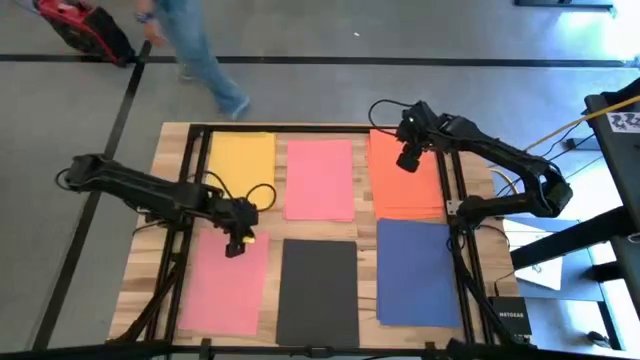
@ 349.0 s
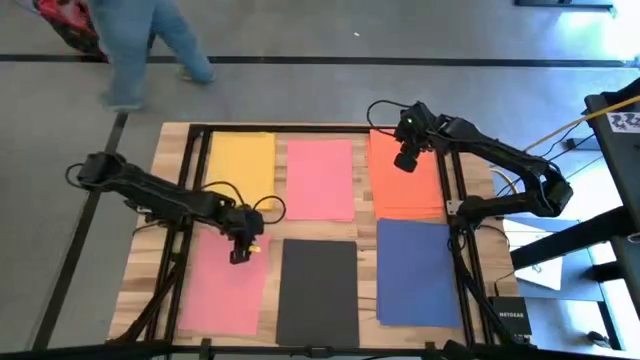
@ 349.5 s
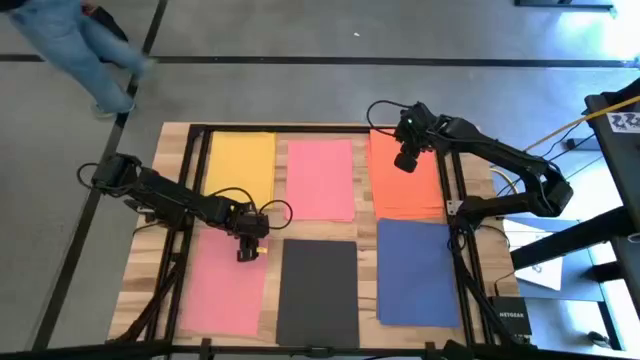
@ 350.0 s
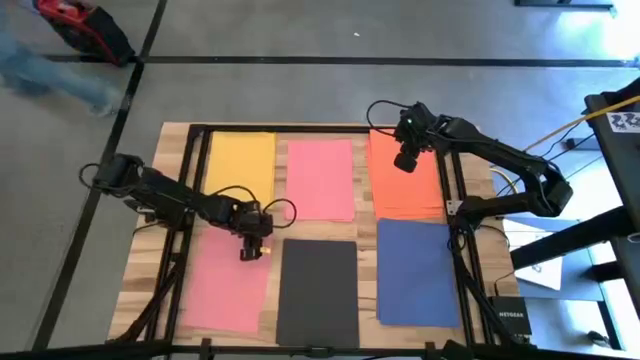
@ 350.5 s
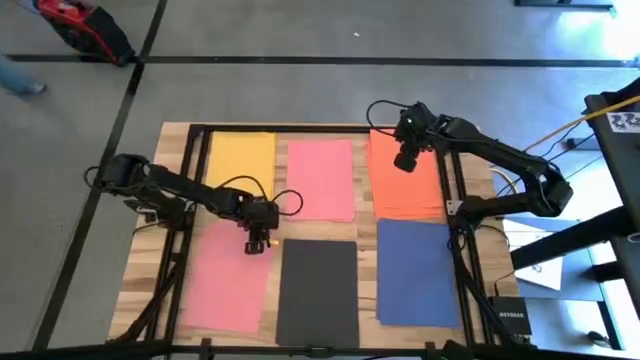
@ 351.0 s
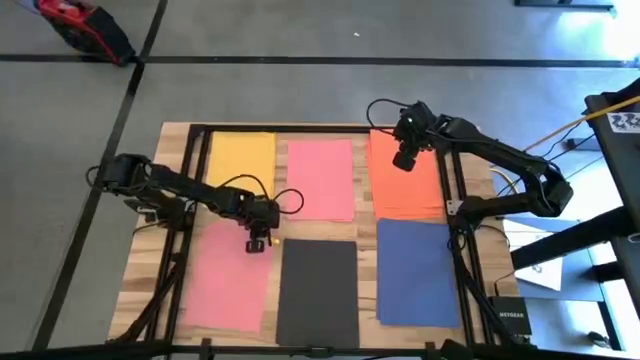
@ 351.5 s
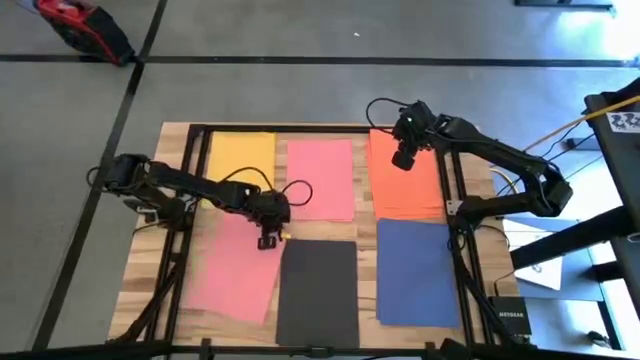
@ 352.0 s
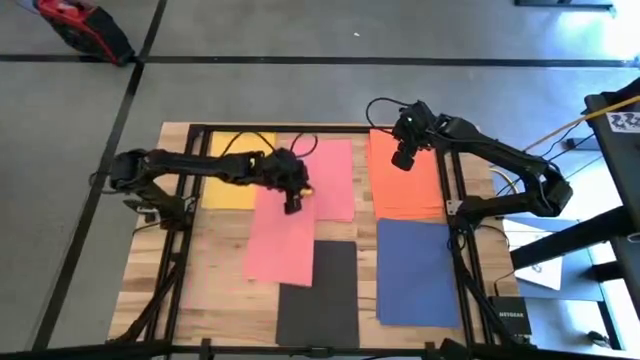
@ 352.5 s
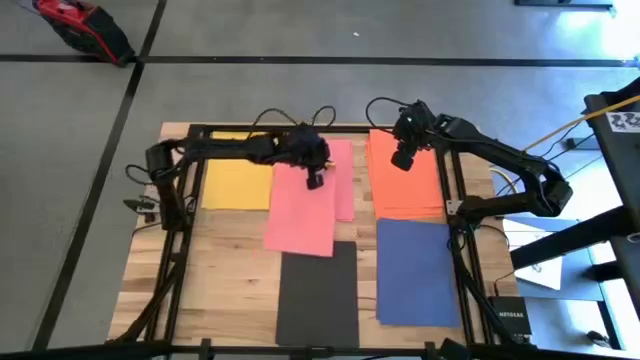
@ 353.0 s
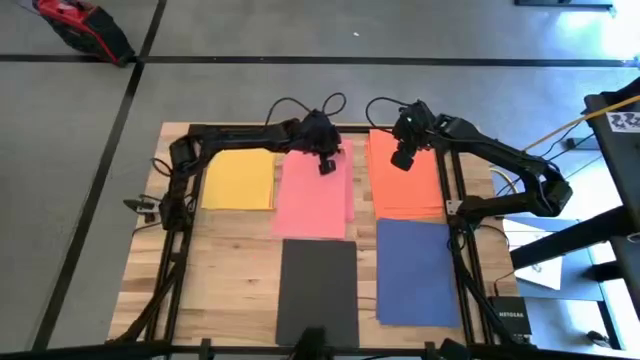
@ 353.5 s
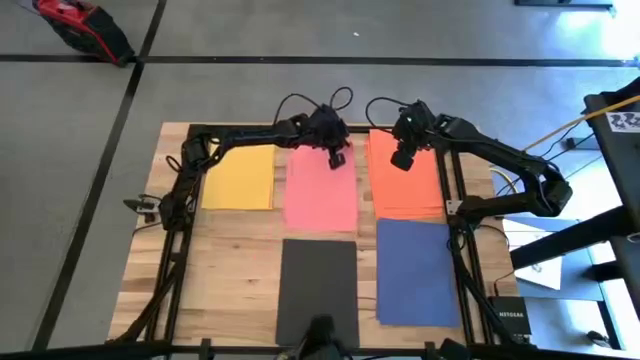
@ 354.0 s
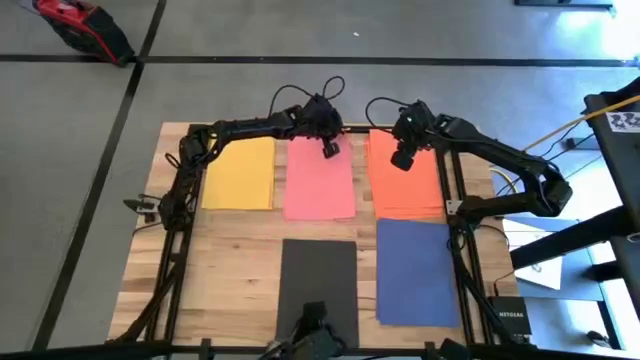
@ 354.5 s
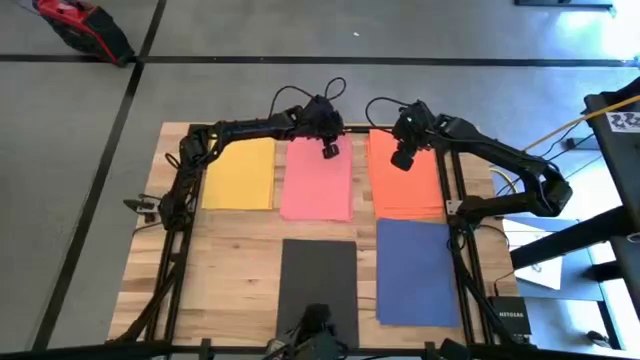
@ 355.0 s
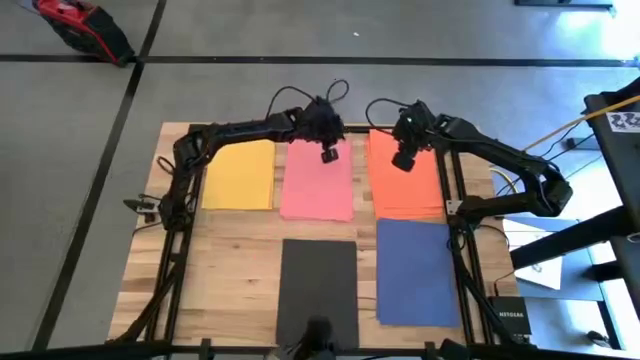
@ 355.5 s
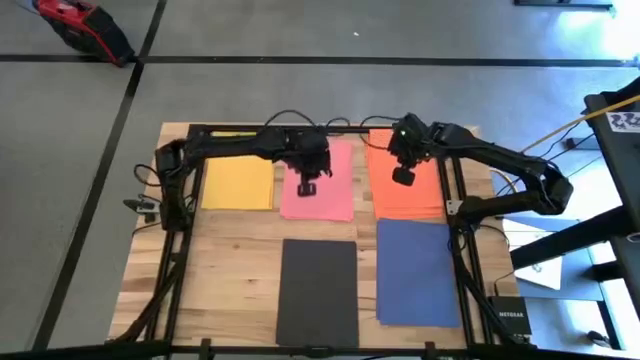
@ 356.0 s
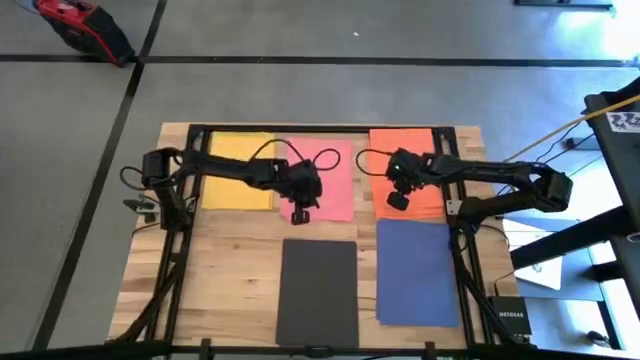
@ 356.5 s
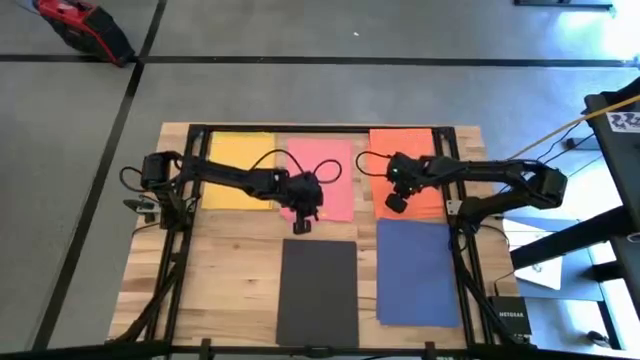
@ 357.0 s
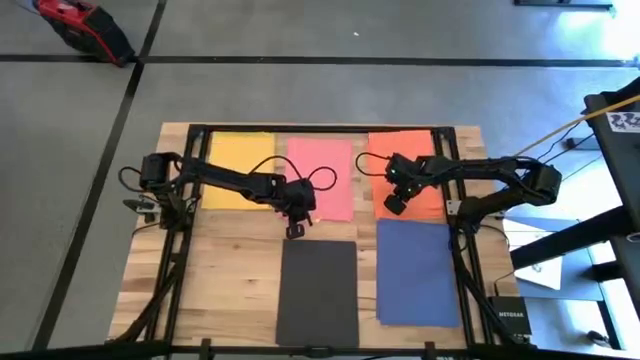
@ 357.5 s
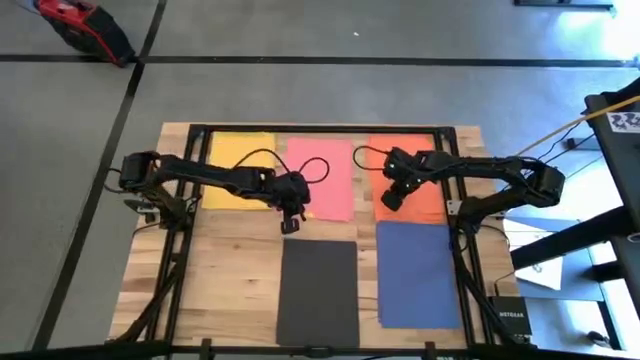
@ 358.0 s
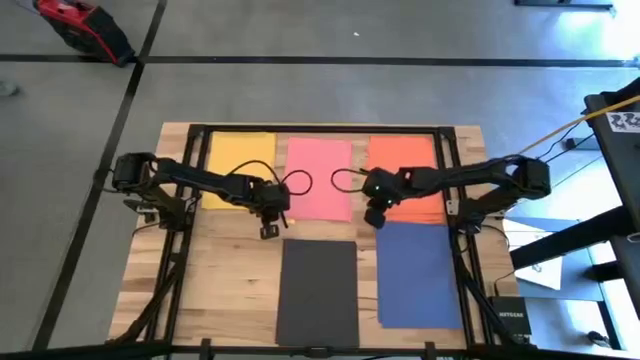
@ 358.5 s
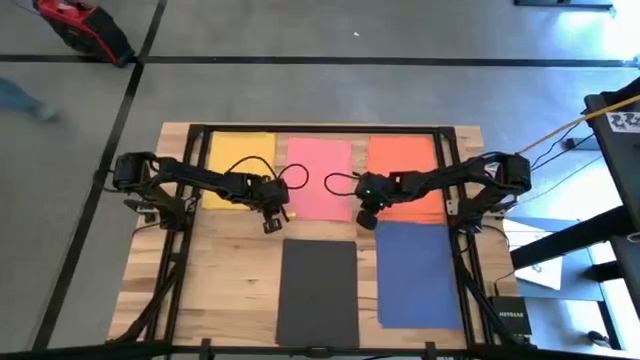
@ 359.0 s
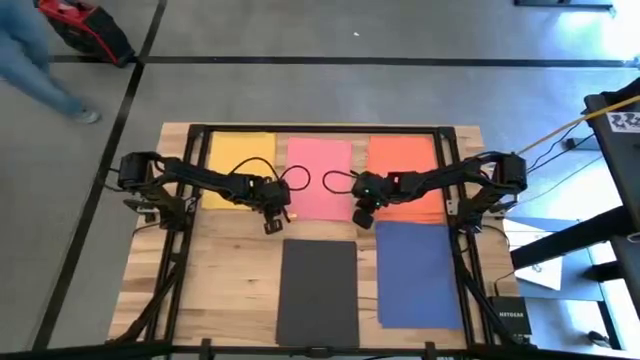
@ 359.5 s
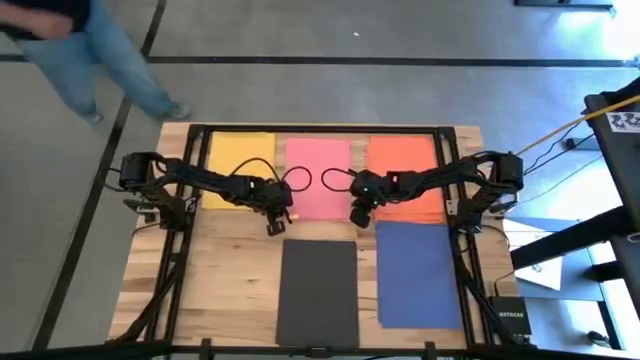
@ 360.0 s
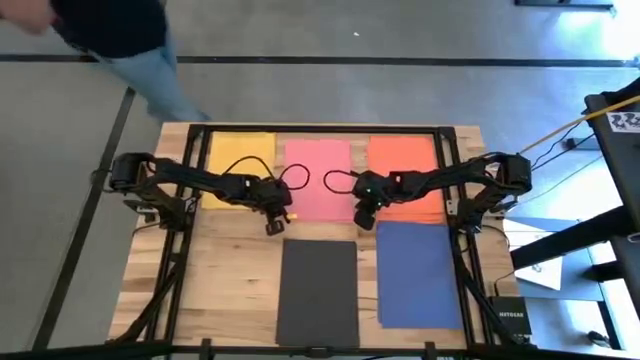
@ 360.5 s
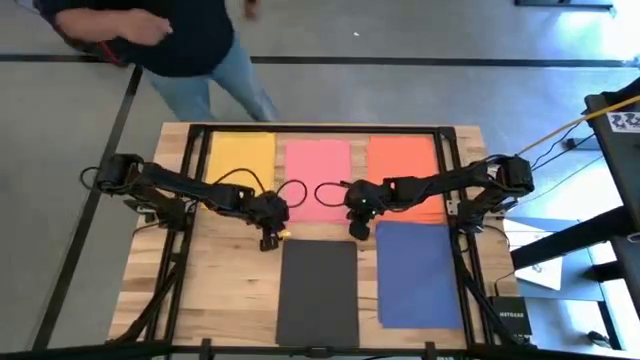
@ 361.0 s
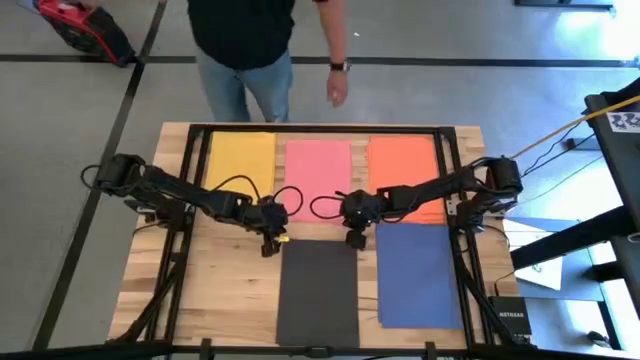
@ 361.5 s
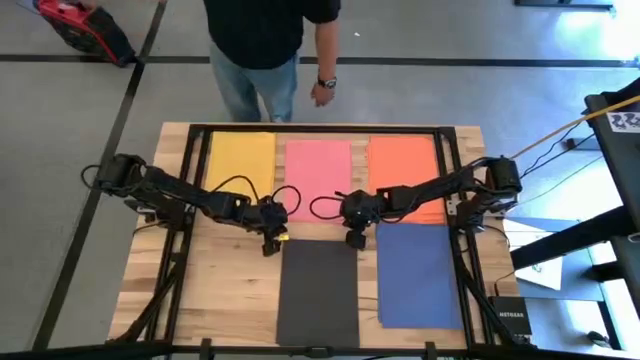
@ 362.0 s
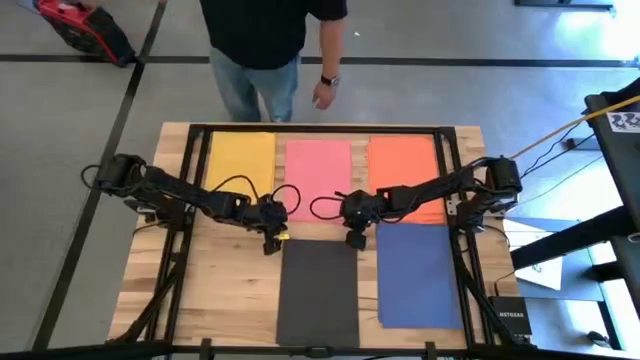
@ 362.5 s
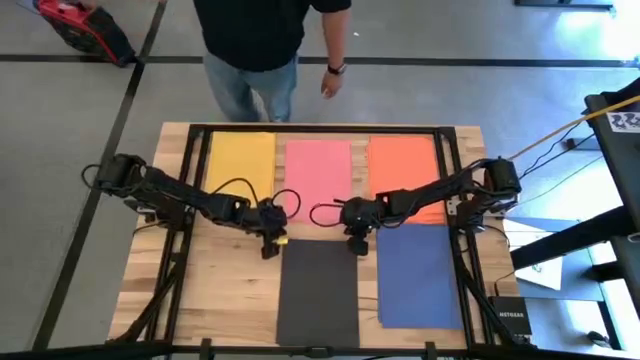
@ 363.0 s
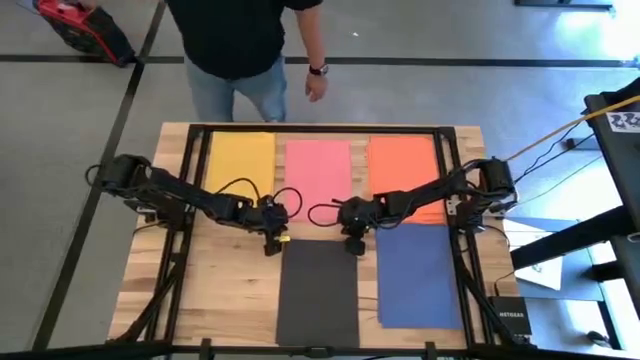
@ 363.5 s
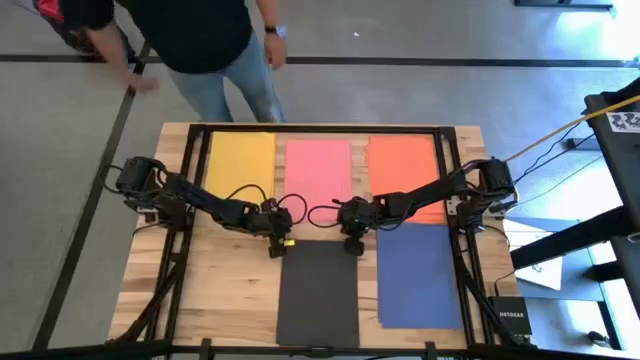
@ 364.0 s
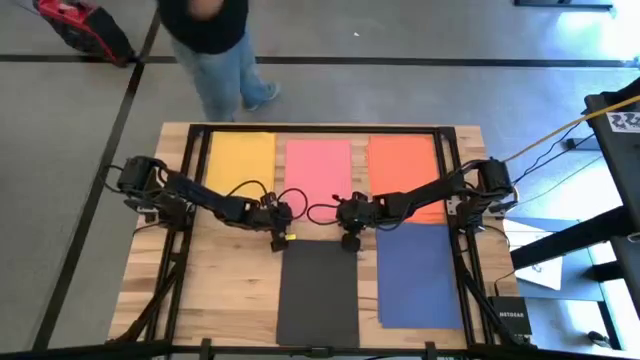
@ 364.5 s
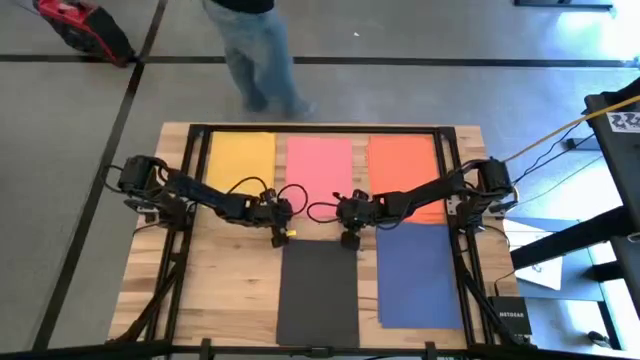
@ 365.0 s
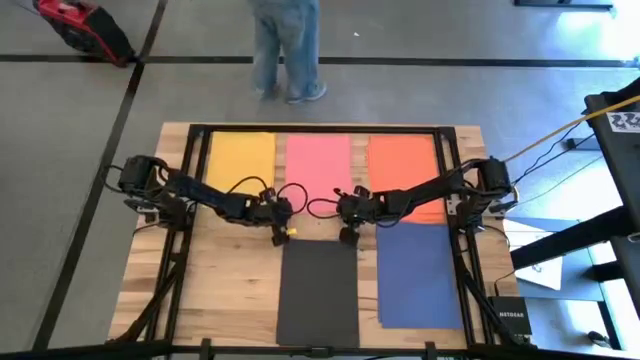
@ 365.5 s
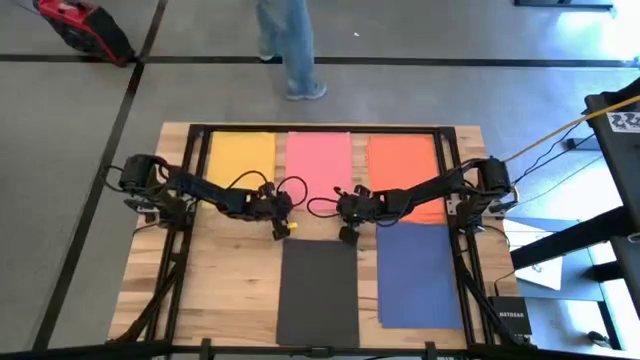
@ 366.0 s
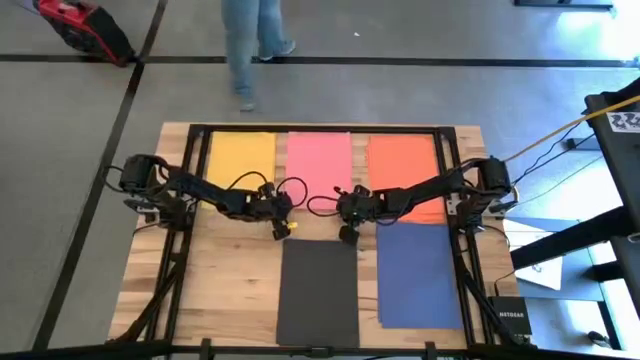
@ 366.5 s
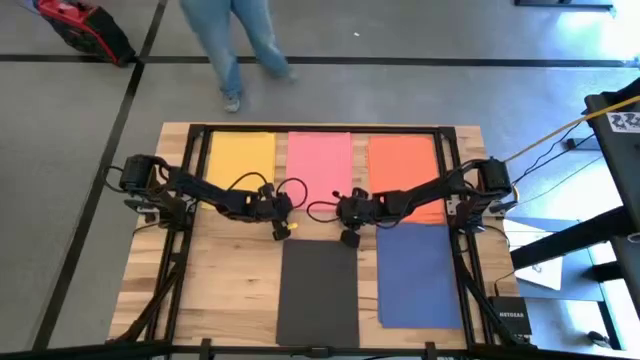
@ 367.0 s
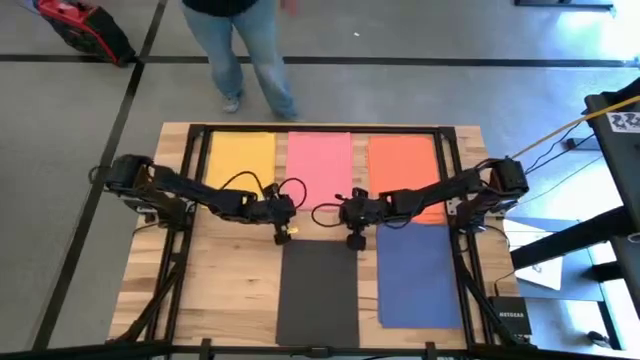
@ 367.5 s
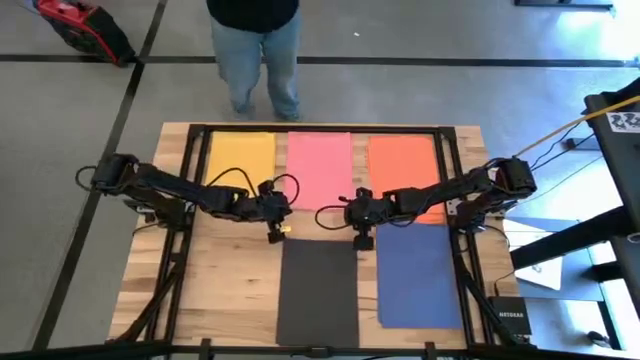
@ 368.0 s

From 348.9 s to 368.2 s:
Task: Organize paper
Stack left pink paper on the top of the pink paper

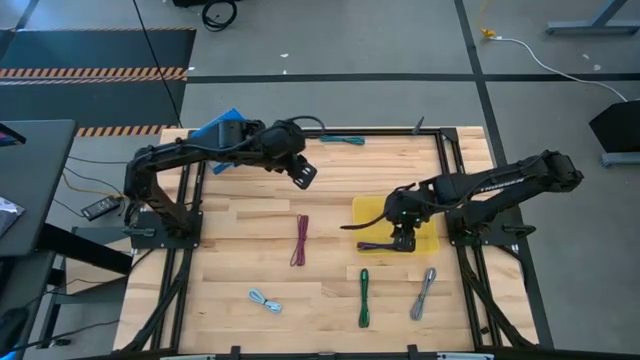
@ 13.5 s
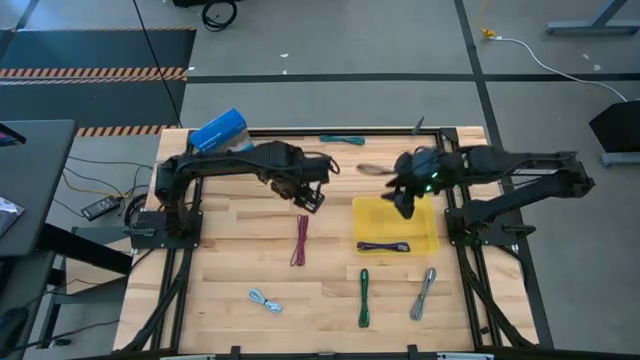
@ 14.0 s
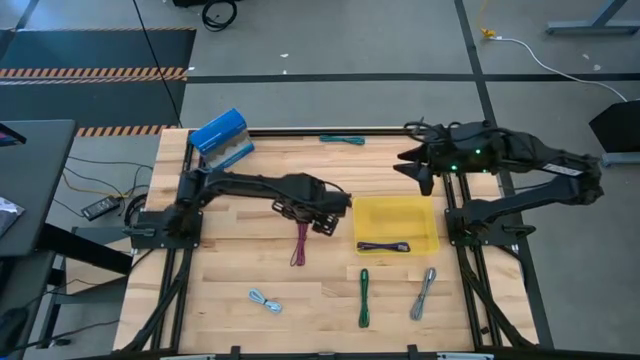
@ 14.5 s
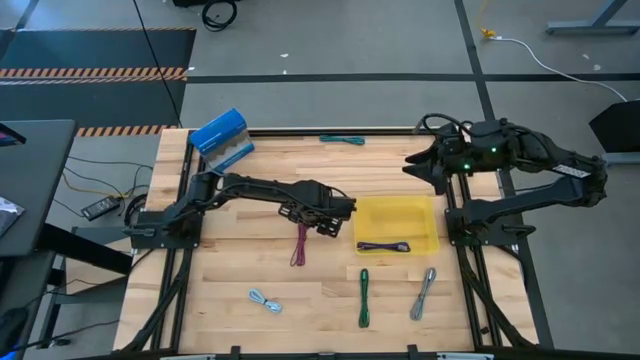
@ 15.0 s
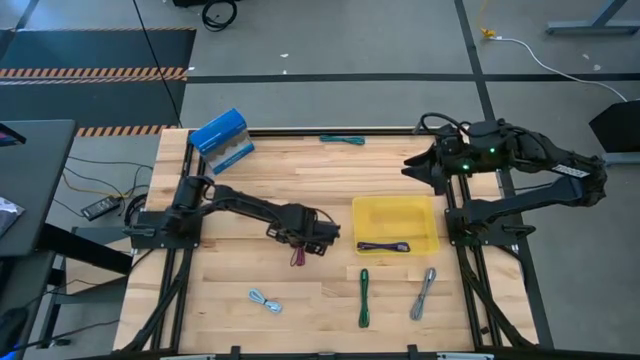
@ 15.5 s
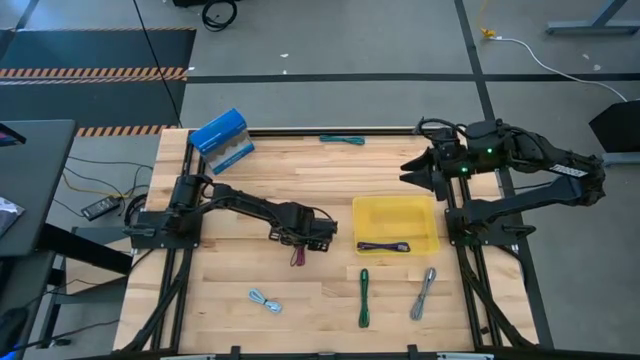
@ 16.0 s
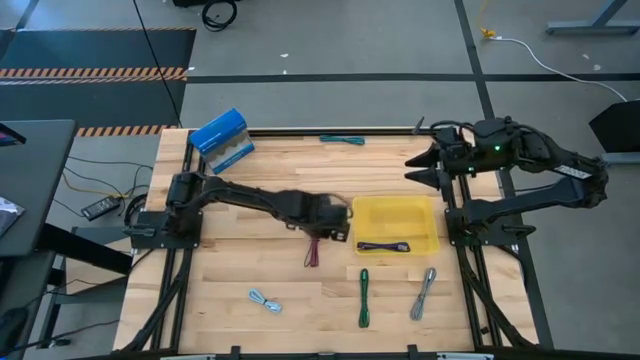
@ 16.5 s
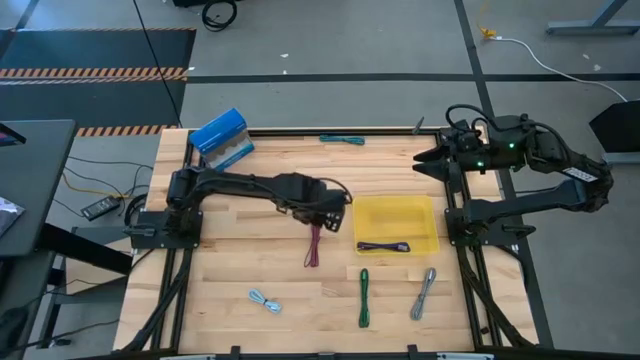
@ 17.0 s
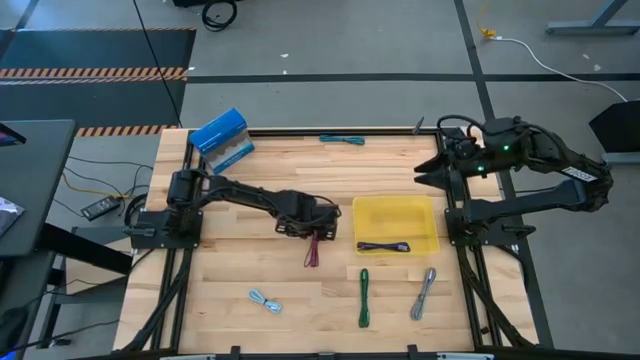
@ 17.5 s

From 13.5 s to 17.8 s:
Task: Pick and place USB-C Cables
Put the pink charger cable into the yellow bin
